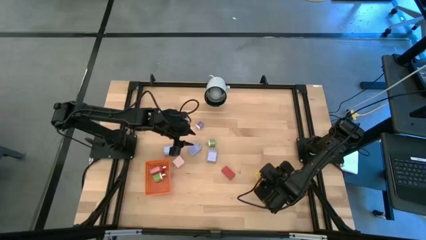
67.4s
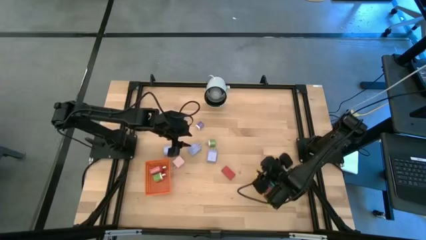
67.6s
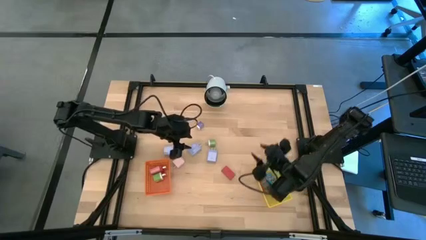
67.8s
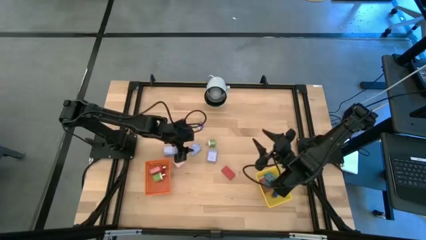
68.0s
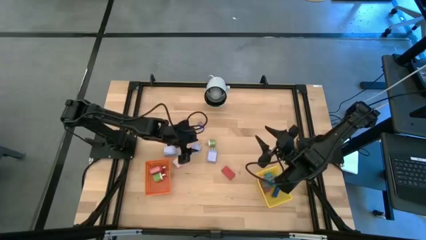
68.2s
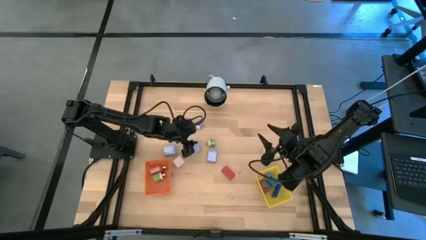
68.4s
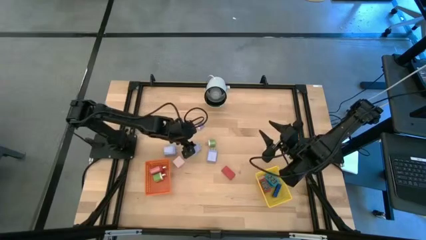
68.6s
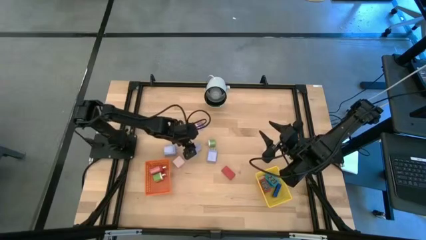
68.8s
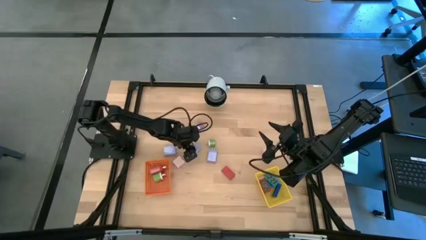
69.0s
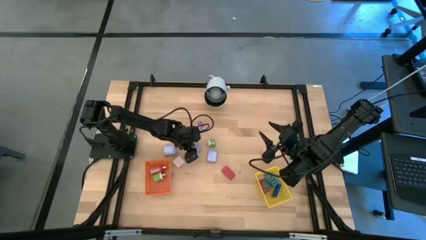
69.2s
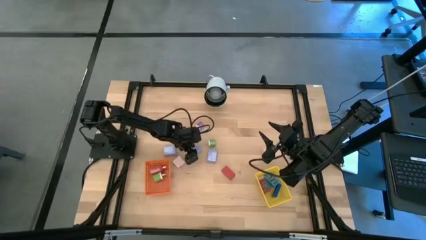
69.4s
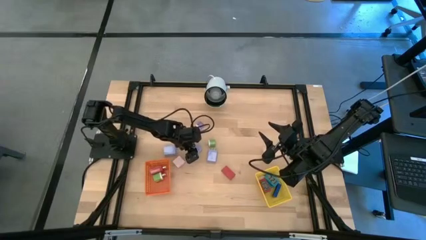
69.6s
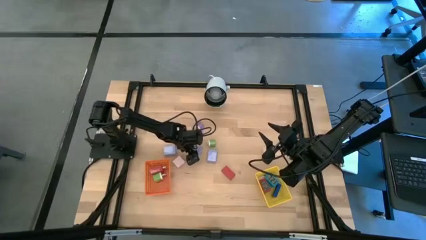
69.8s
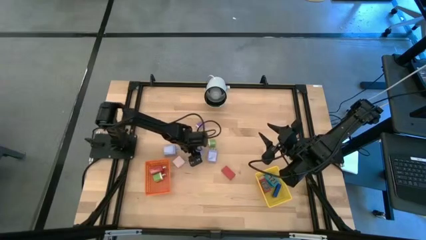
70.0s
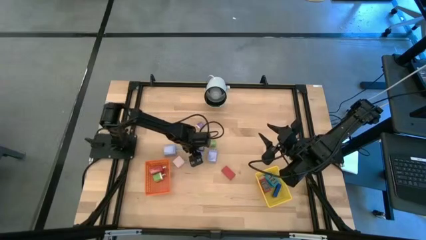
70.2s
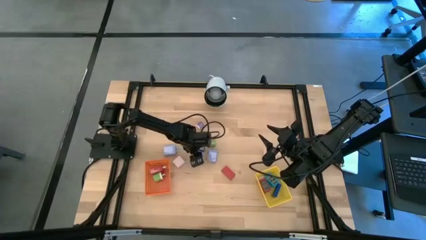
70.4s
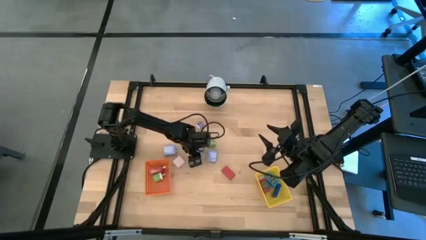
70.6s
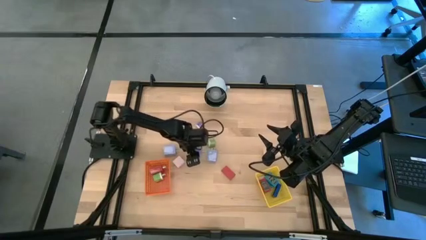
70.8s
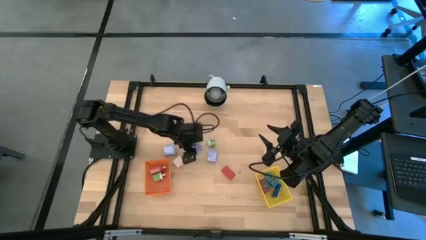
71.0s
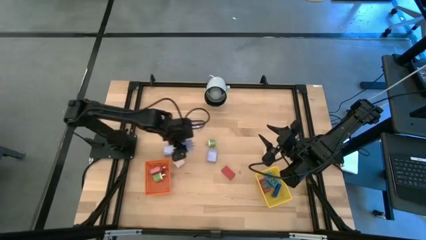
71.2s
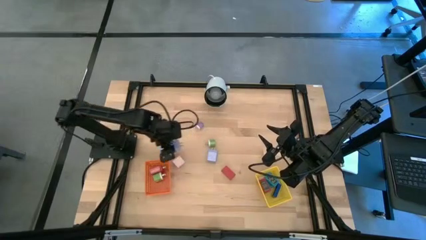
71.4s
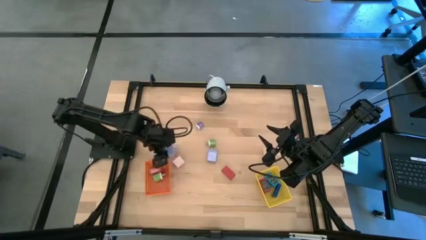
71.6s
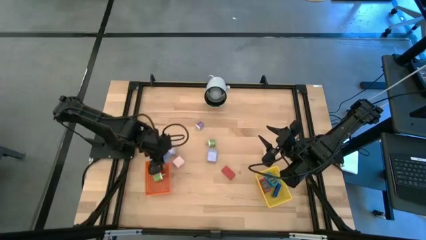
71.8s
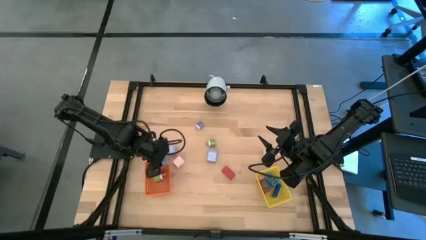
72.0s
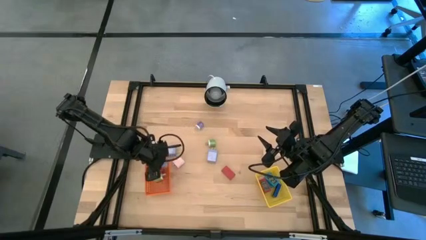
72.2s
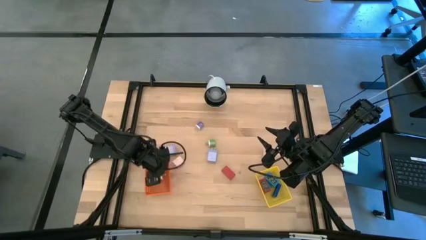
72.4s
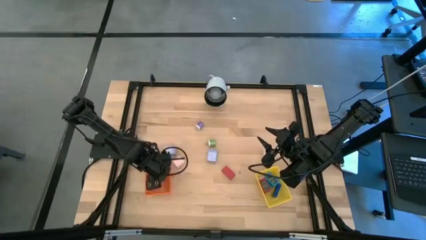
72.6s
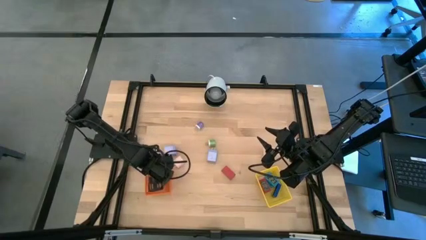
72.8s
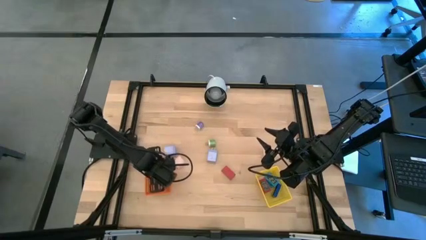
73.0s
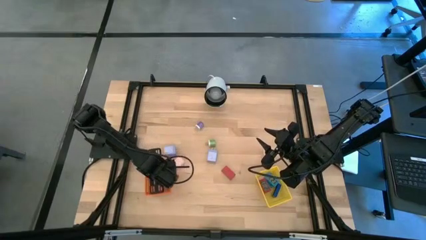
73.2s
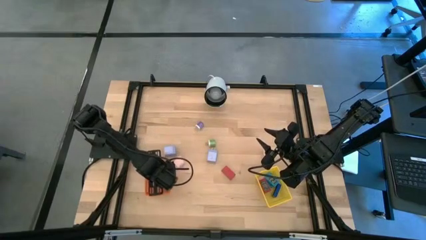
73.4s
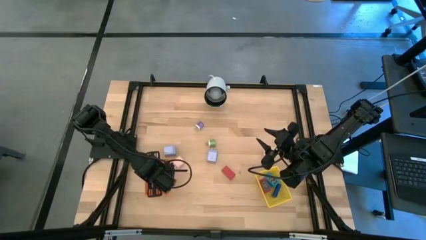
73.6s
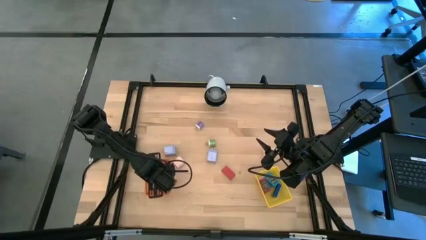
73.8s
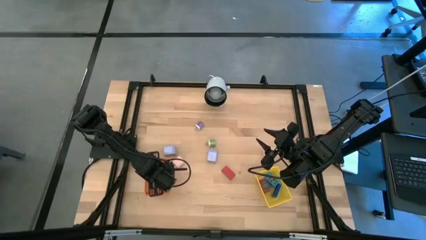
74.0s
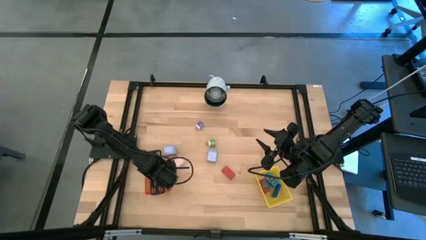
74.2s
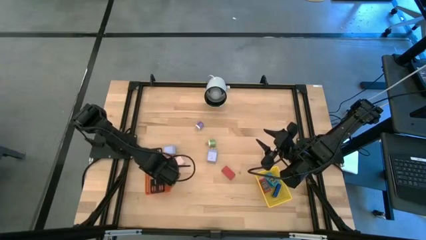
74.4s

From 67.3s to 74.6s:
Task: Pick & Place Office items
Put the center light blue charger adapter into the orange basket

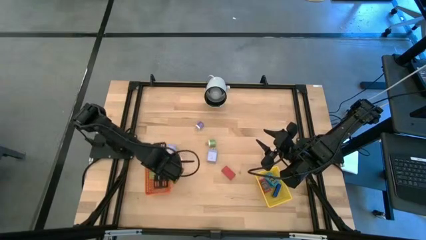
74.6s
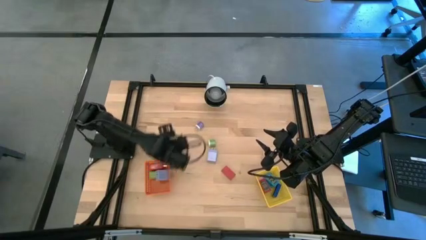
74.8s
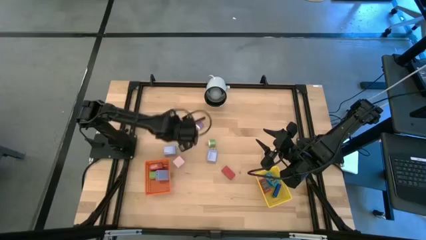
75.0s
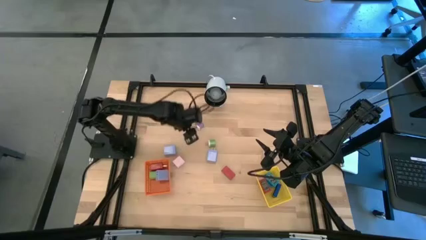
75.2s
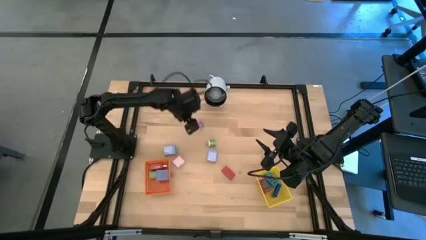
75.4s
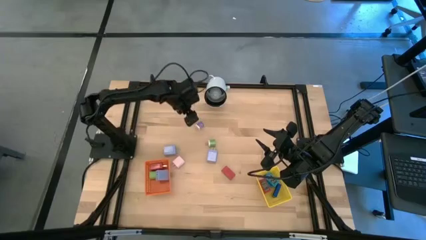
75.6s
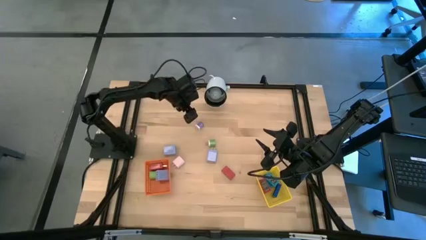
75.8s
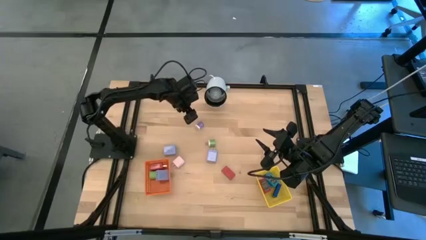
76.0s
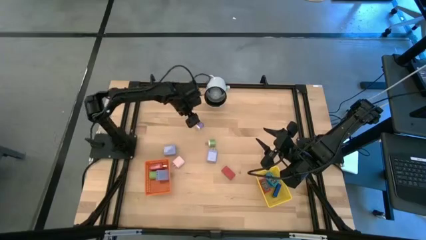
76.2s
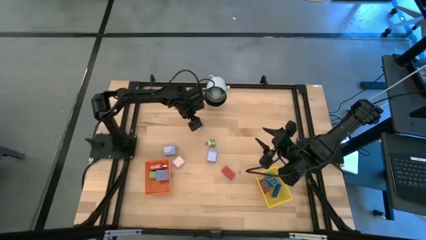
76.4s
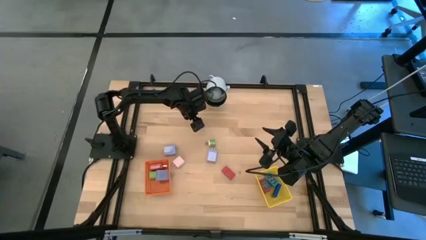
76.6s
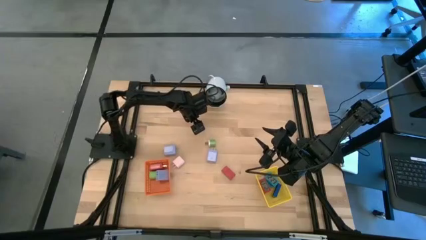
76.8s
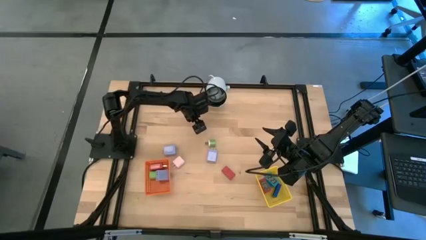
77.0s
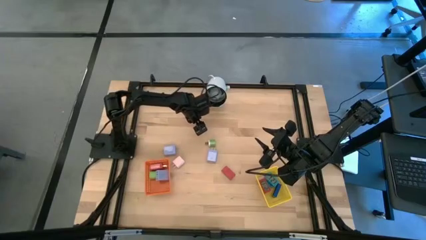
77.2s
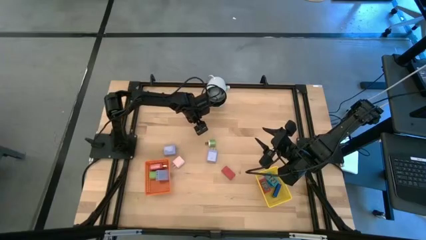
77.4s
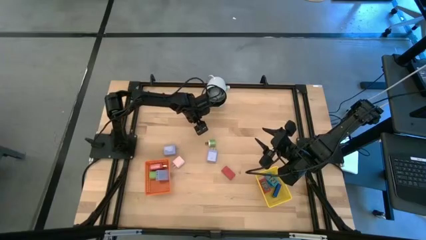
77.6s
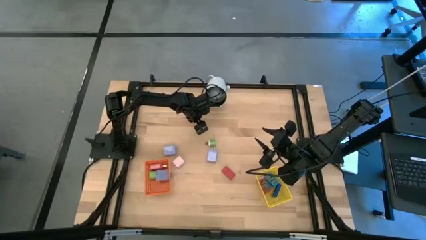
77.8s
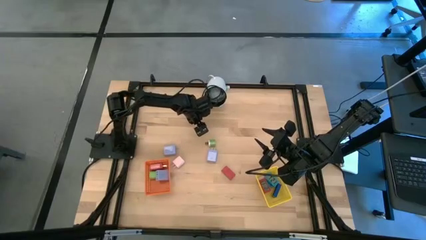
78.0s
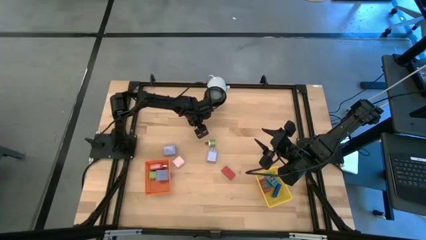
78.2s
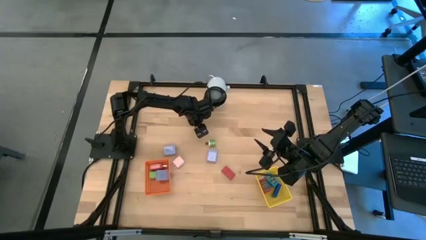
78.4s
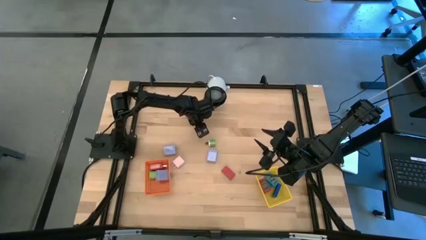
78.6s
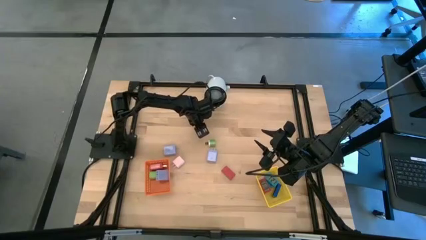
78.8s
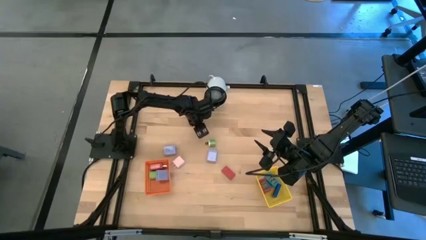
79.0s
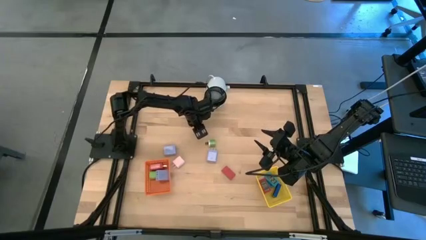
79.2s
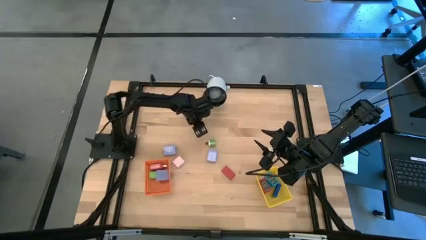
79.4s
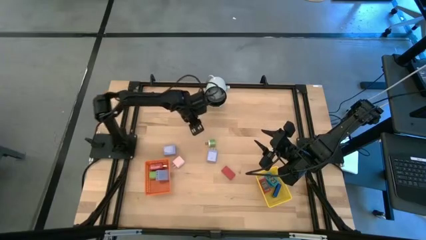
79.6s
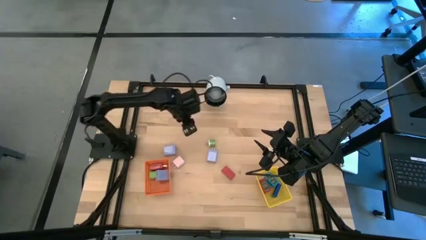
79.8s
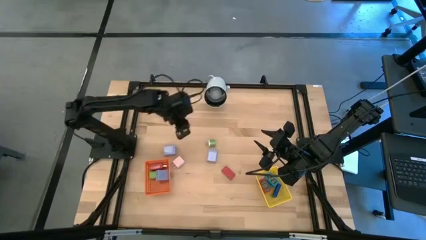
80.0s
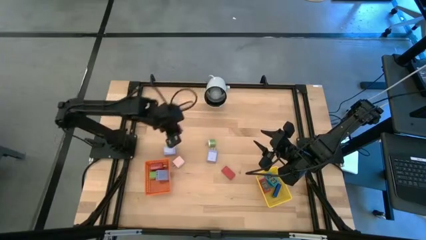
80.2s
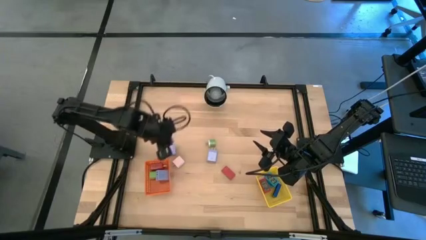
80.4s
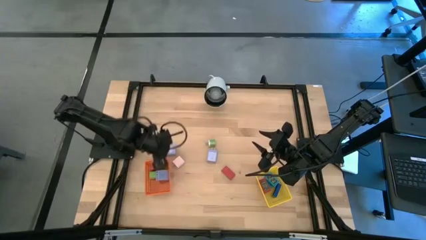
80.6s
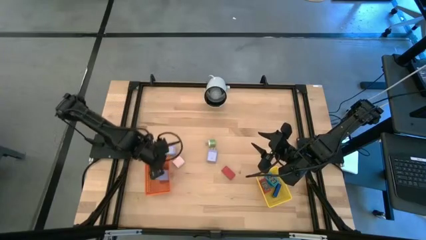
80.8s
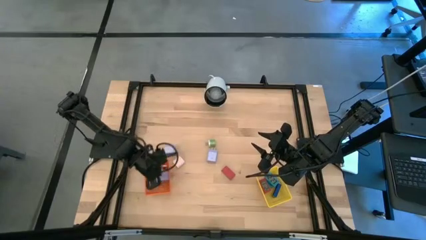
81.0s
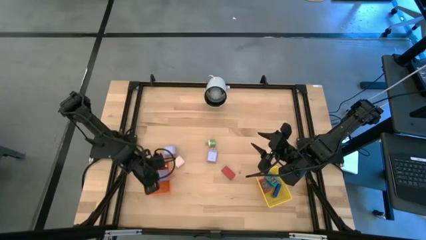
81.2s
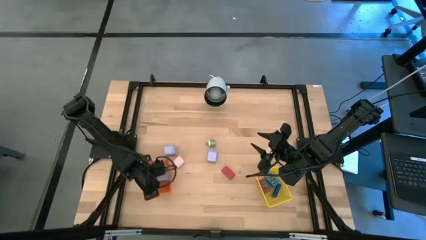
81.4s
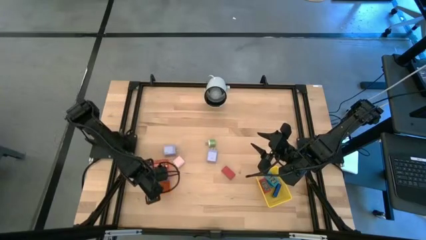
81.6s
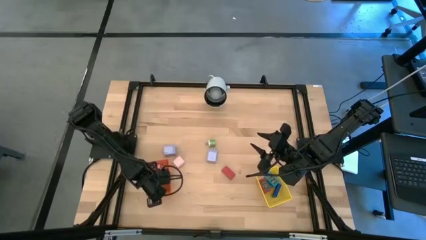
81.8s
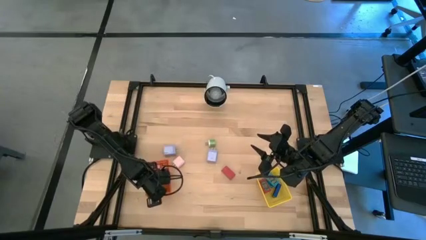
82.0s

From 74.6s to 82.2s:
Put the violet charger adapter into the orange basket

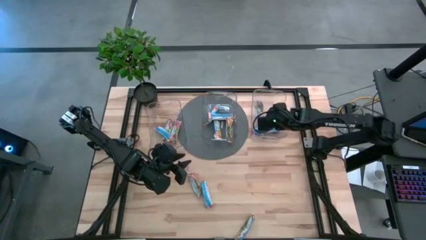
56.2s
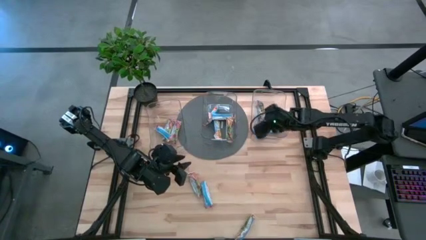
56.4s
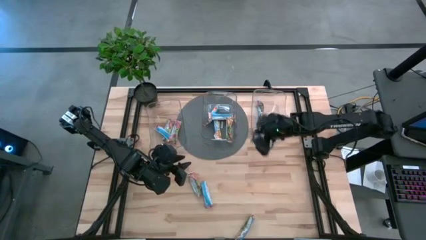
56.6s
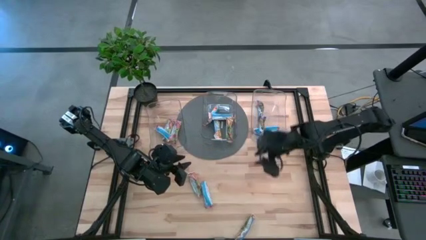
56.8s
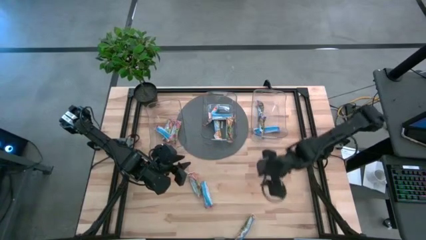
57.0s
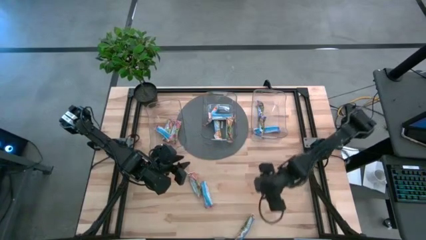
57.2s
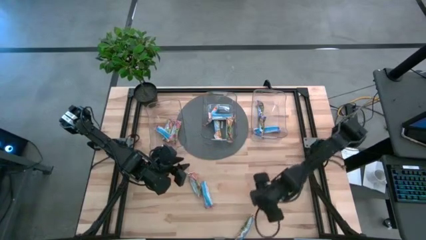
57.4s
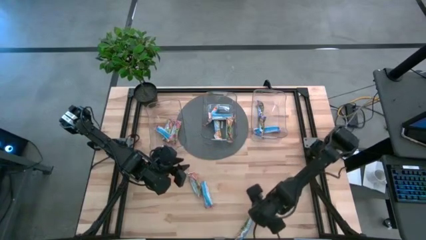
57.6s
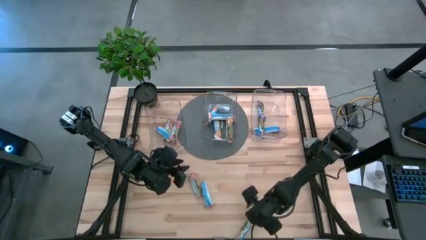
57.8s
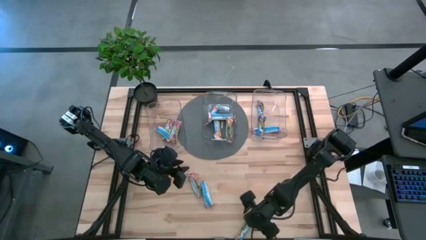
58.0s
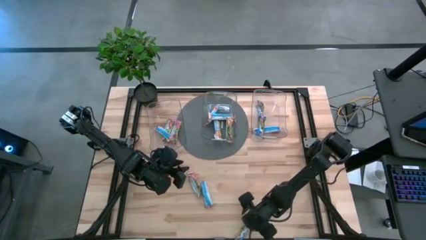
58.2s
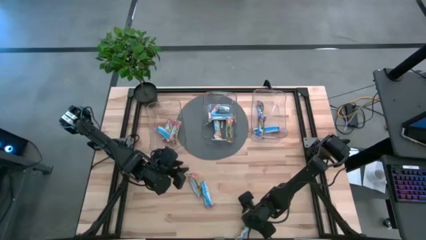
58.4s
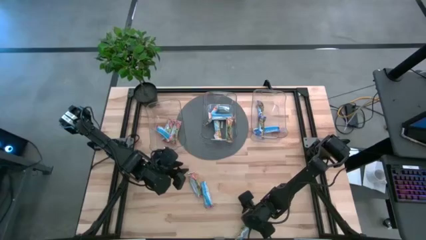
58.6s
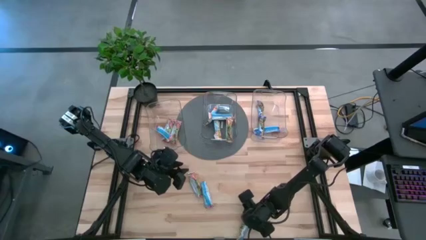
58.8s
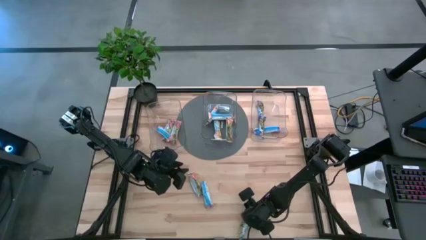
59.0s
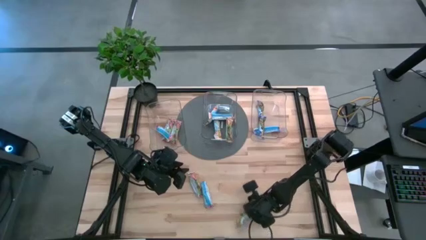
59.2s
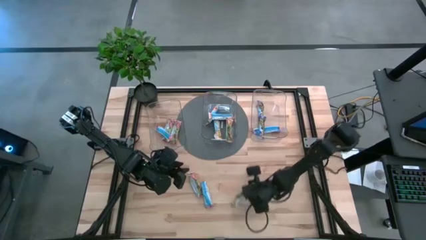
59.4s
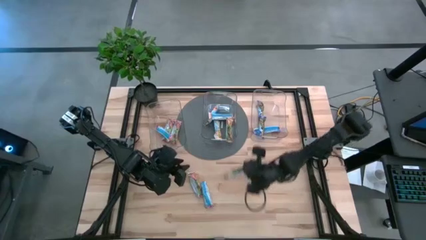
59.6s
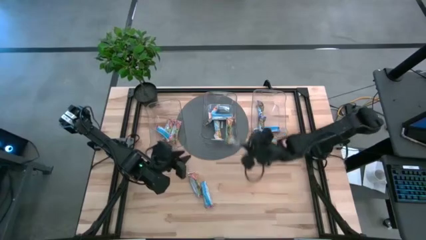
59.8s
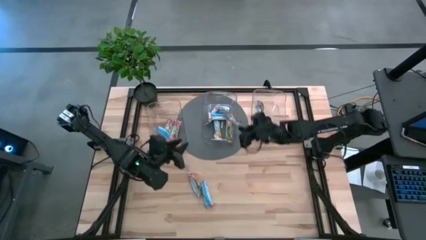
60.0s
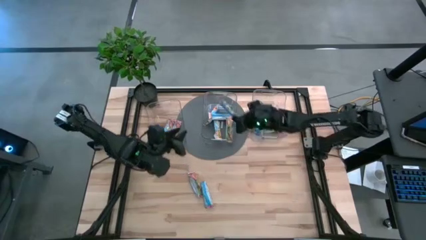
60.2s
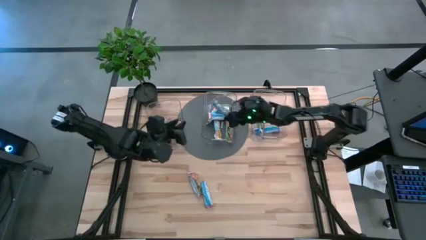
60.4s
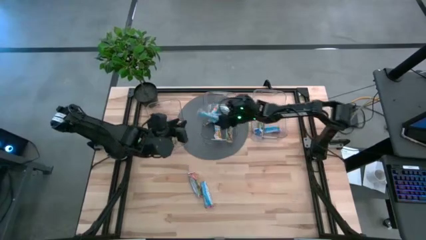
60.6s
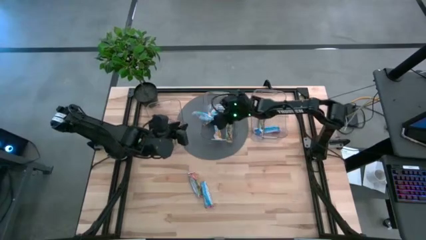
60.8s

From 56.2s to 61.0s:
Task: Pick and place Granola Bars by type
Put the yellow granola bar into the center transparent bin
